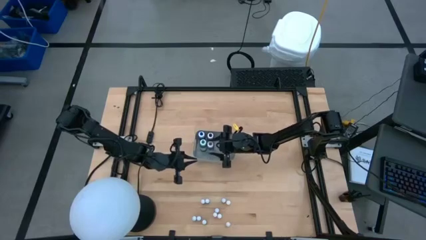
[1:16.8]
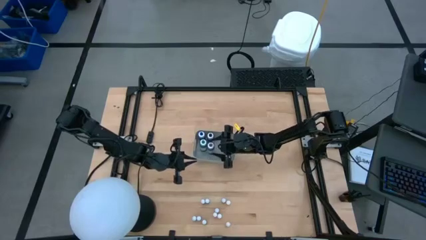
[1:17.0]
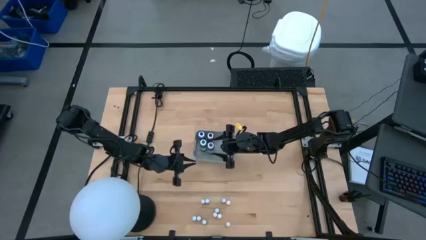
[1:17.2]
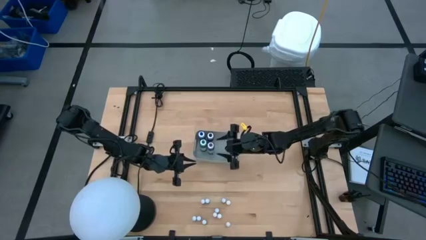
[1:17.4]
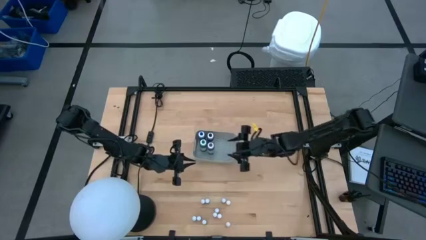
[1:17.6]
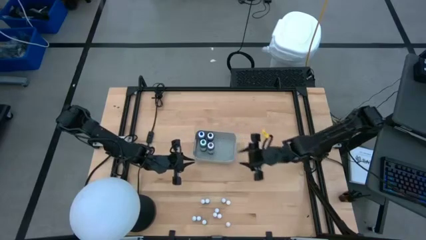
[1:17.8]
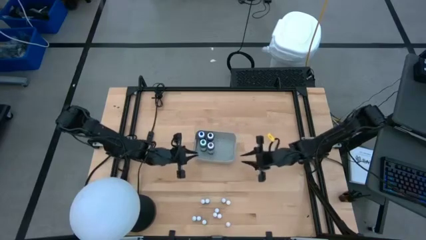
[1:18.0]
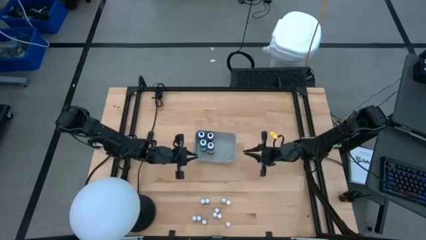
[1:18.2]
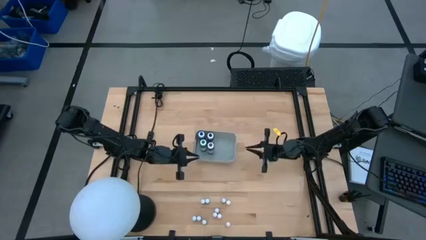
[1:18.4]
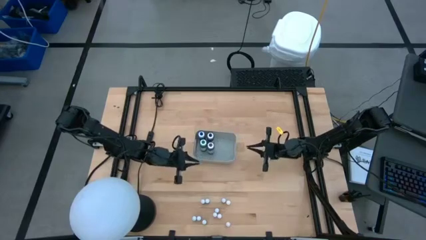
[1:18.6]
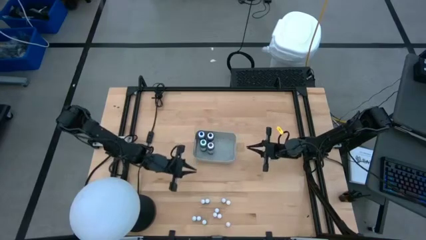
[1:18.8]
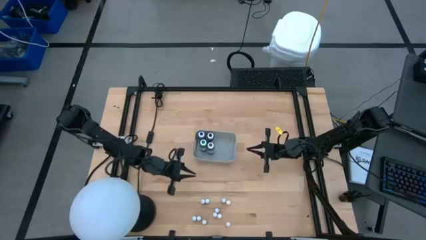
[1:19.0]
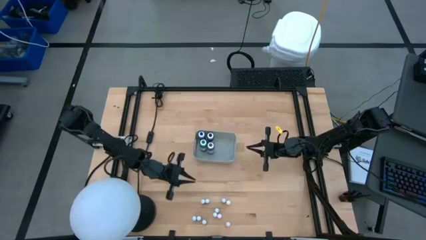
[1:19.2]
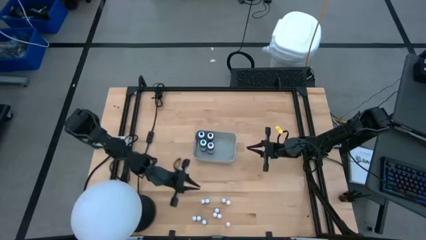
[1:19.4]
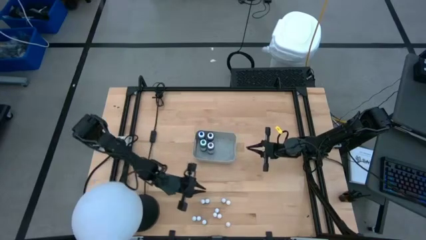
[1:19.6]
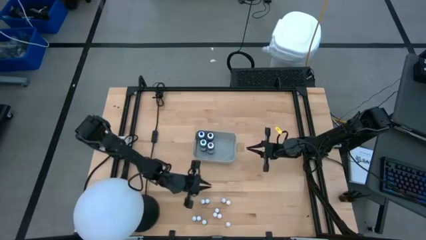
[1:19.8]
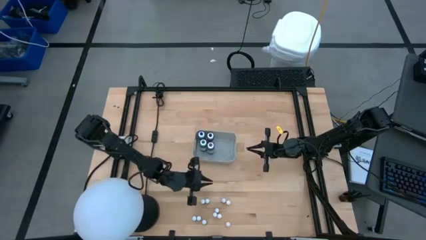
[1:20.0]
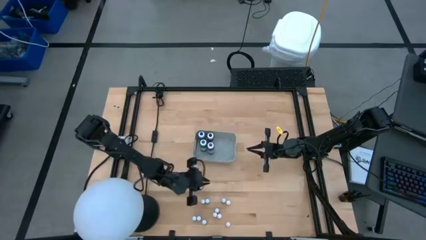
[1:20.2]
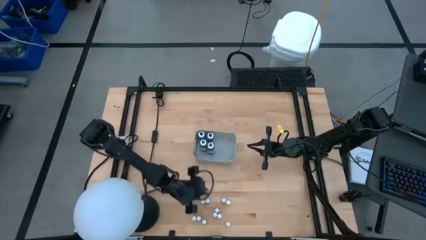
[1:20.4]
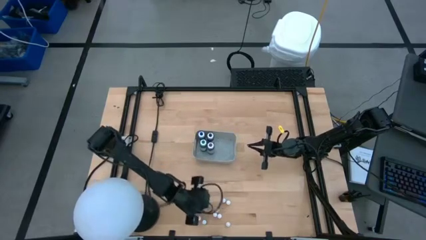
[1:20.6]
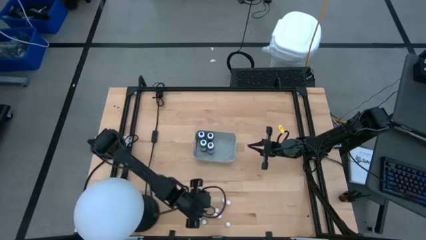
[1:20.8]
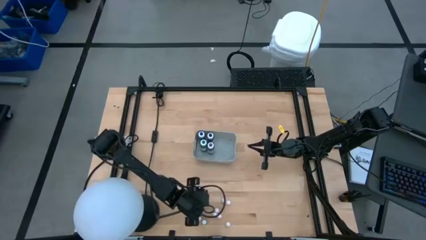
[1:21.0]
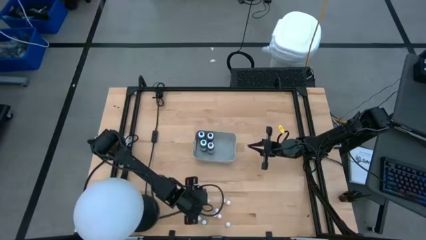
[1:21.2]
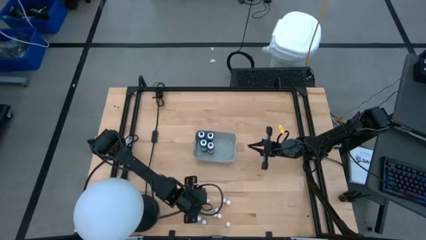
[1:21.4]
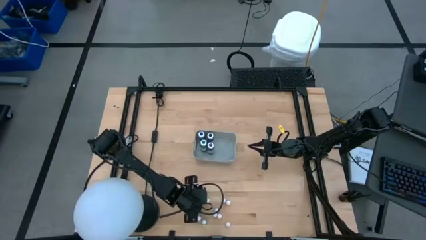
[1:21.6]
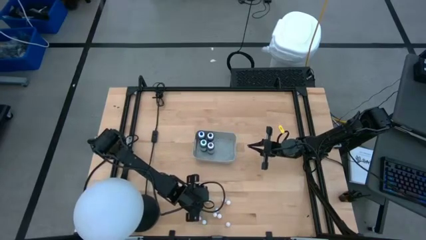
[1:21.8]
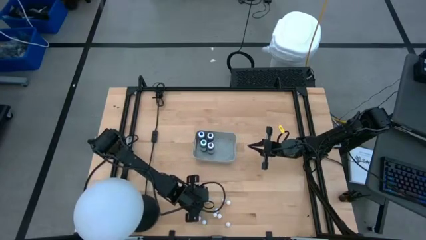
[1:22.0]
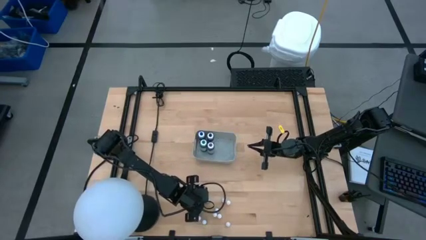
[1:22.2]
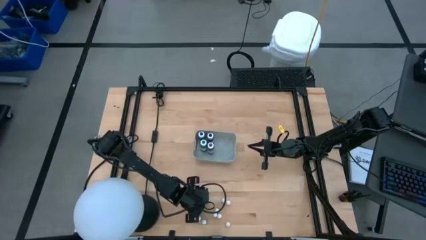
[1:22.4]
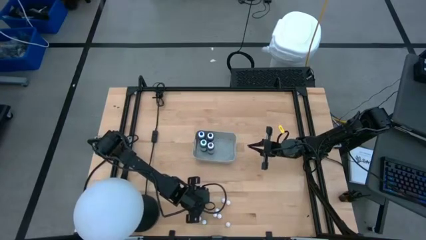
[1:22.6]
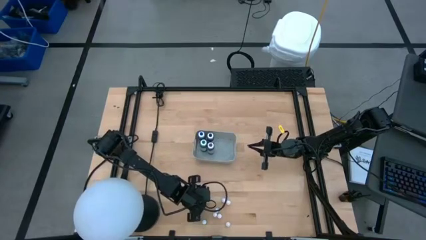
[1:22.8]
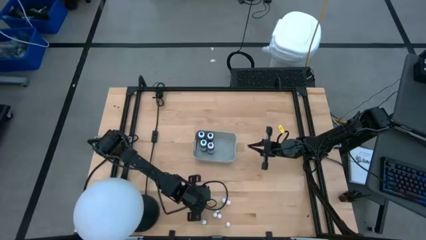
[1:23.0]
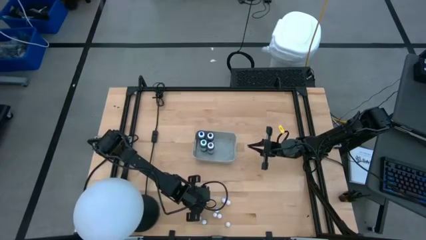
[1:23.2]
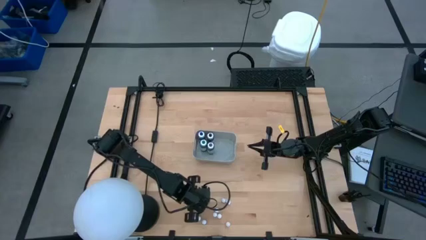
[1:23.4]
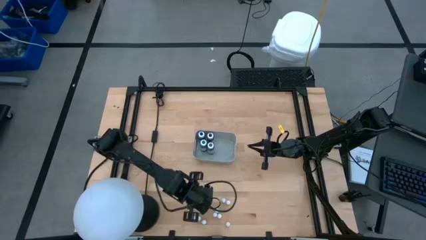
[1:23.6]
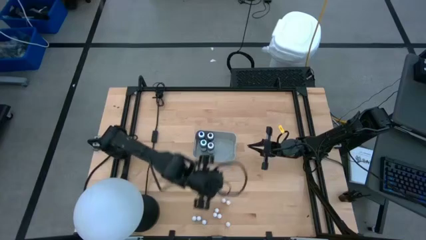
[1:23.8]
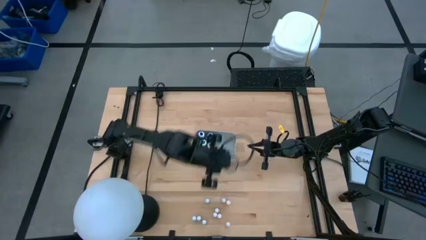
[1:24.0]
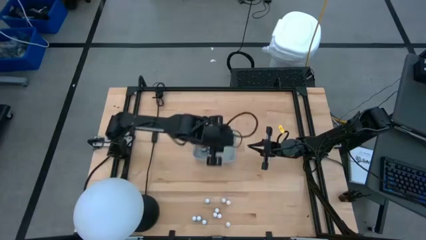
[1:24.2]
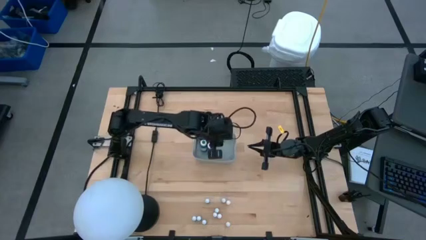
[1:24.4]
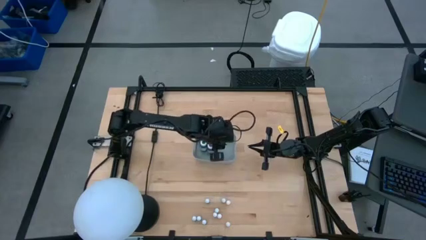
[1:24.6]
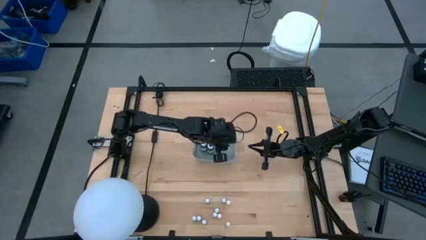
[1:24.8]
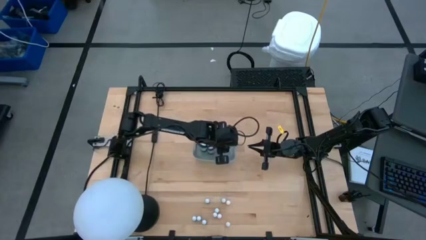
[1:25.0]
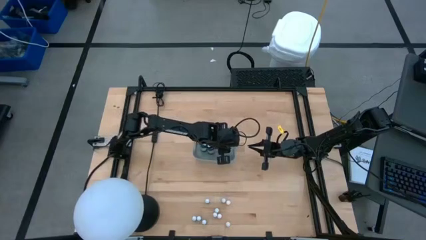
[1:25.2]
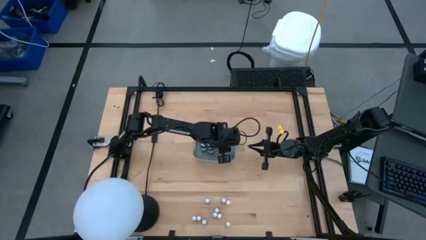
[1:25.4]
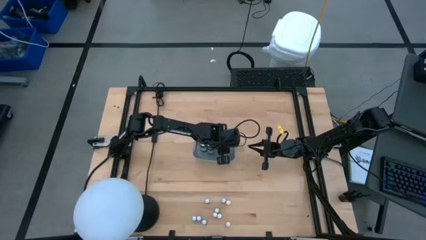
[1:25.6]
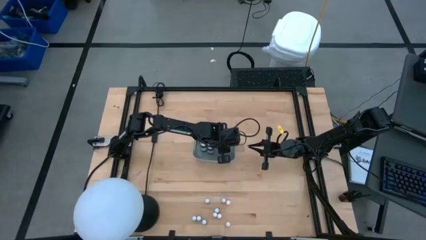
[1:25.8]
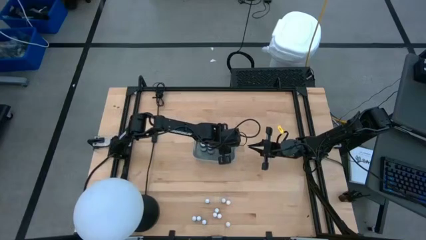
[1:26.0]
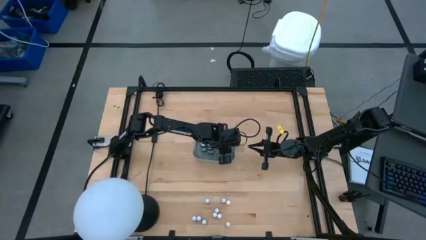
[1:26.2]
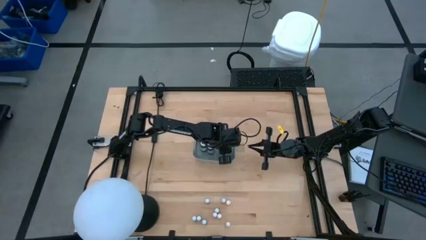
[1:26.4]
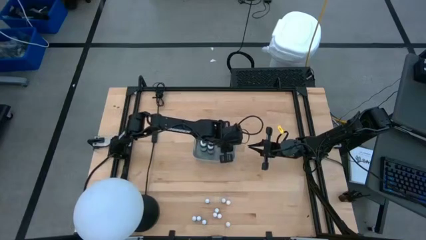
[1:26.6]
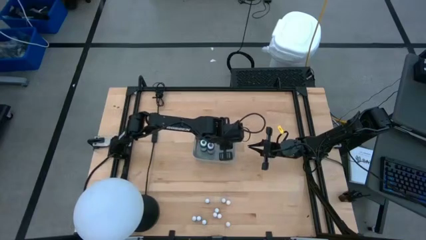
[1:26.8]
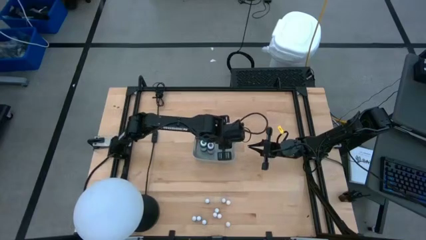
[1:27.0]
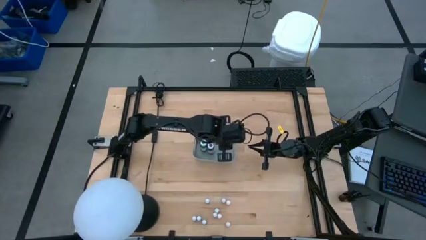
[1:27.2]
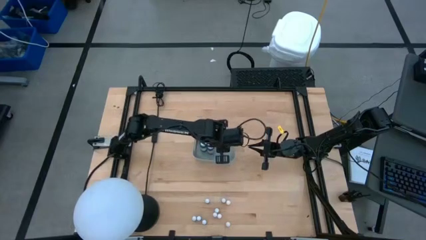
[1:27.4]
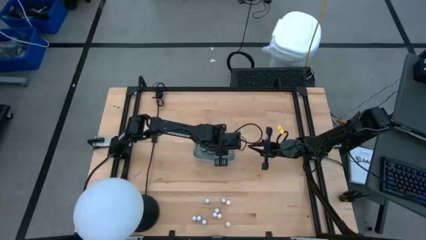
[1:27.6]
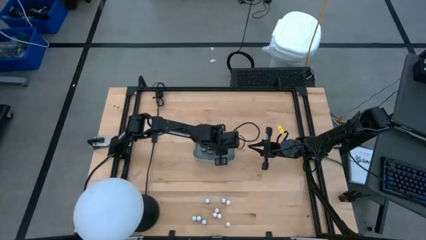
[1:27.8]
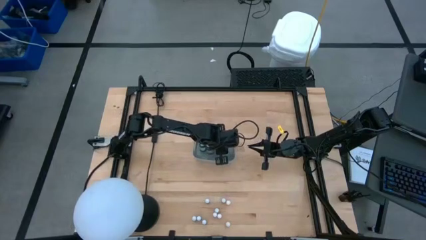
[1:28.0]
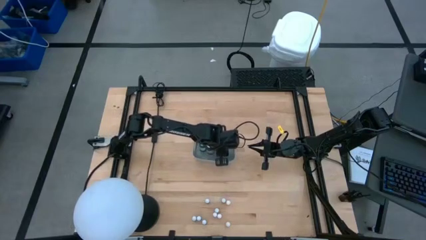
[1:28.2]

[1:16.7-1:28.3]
Task: Pick & Place food coloring
Put the small red food coloring bottle into the gray bin

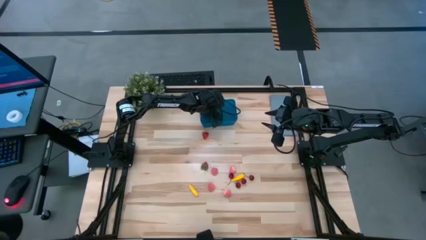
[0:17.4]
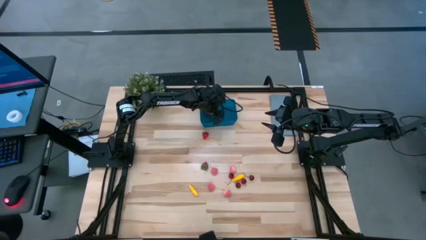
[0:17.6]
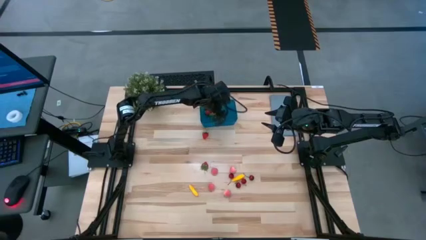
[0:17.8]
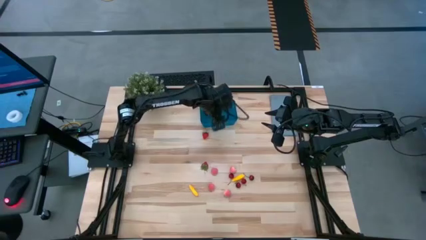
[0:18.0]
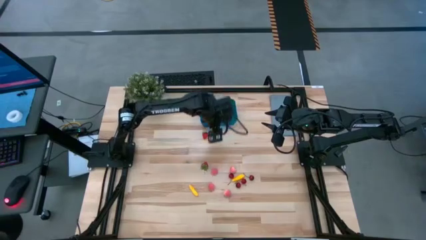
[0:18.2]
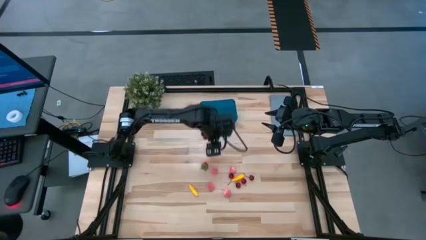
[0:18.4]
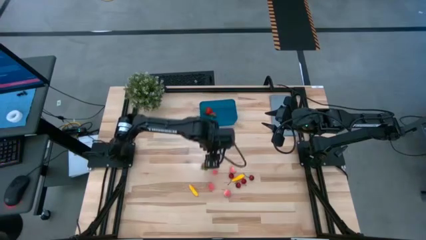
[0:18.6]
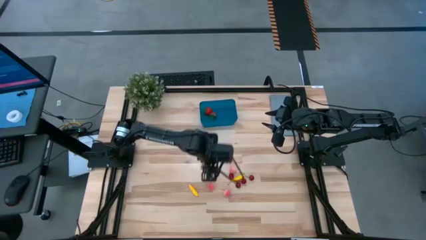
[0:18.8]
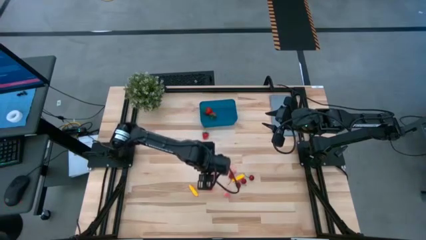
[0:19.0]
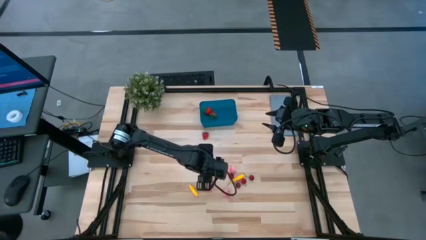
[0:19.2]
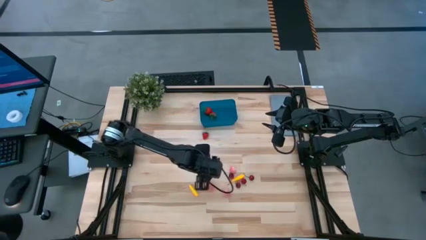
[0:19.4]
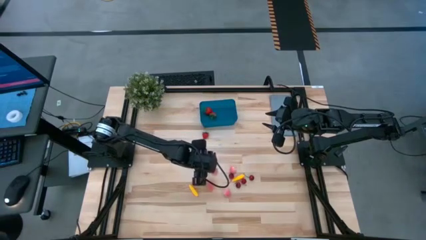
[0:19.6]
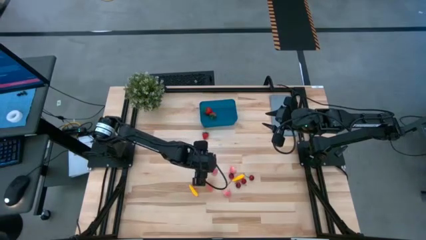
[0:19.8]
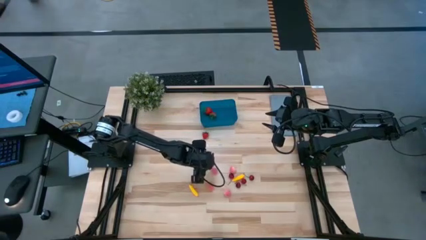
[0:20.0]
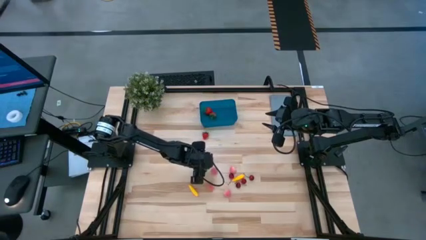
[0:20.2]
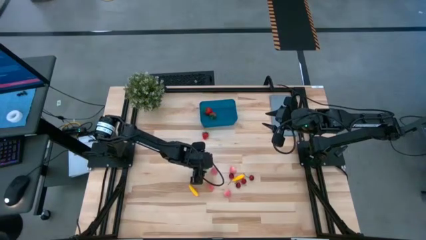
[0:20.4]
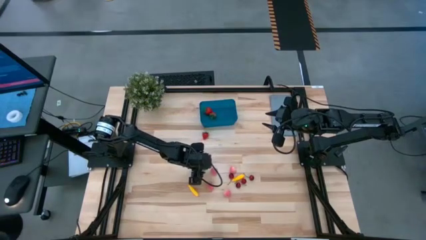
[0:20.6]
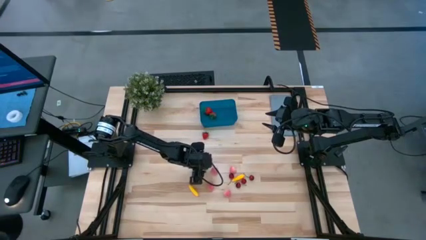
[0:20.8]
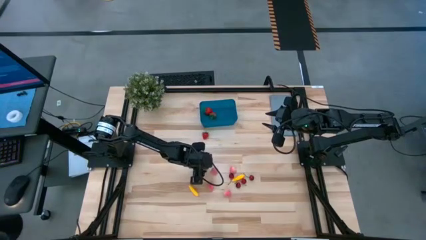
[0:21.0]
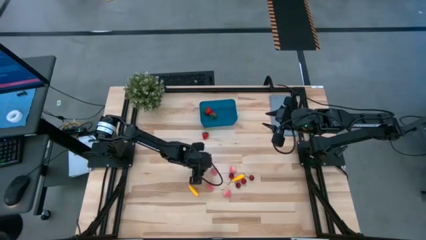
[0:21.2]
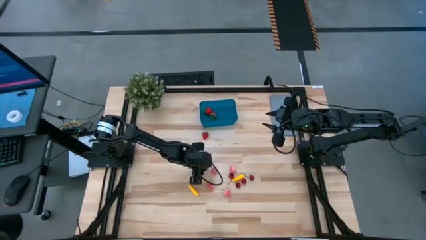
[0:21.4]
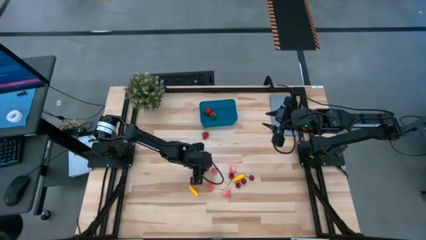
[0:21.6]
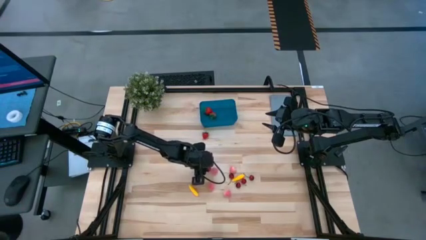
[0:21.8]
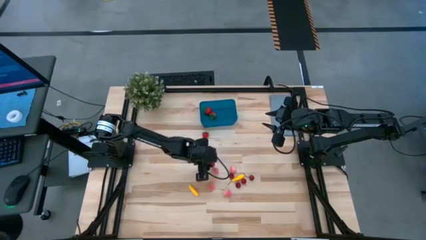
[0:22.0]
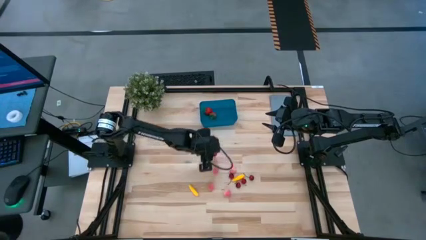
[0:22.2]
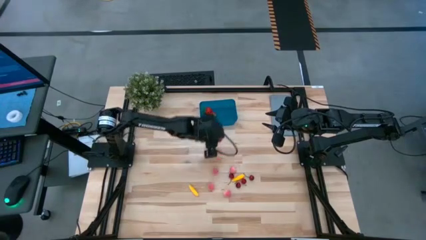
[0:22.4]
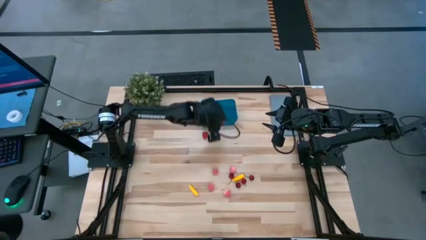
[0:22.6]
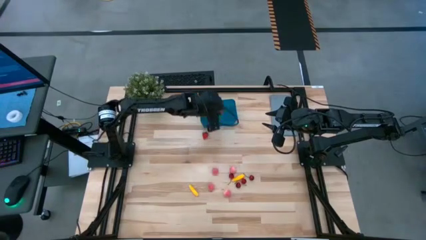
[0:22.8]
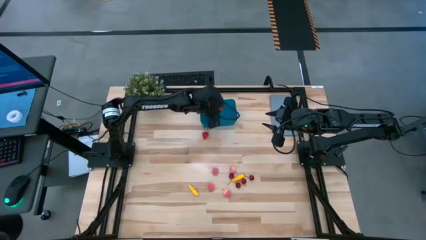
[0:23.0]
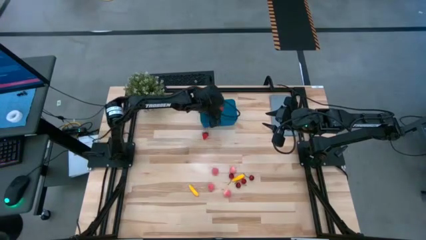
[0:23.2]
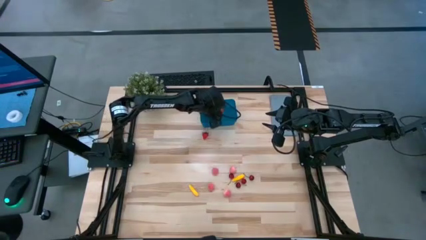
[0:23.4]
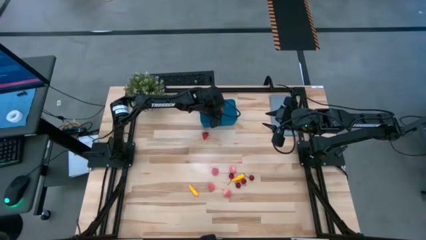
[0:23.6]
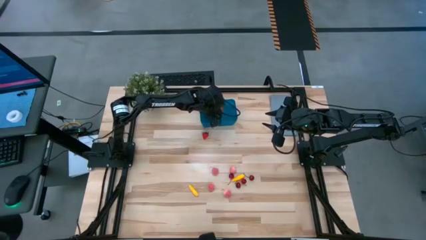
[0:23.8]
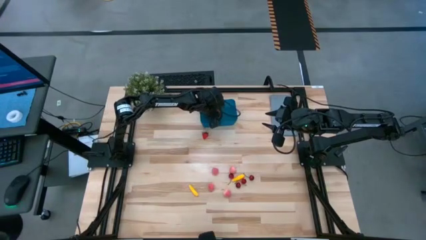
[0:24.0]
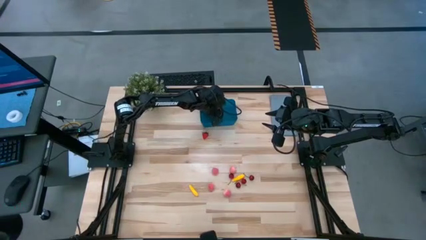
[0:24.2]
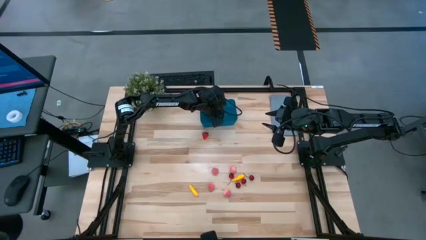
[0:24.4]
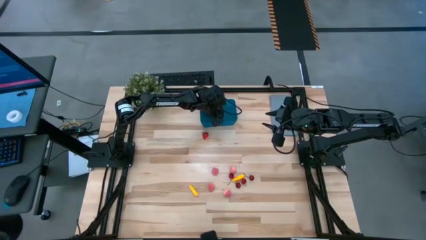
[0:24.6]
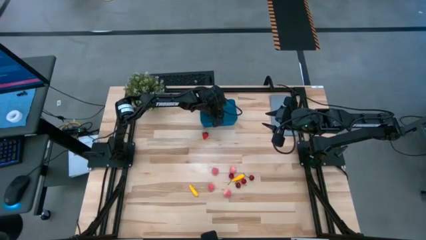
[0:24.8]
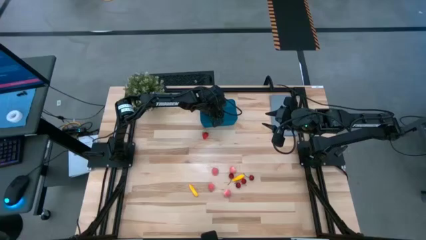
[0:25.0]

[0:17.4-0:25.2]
Task: Pick and placing Produce into tupperware
Put the strawberry into the blue bin
